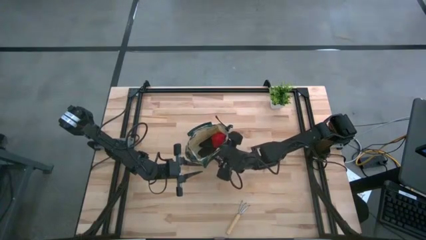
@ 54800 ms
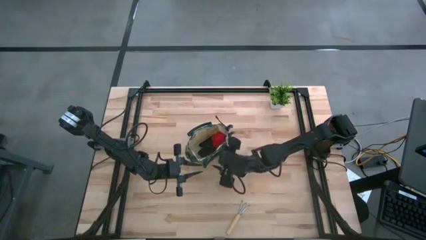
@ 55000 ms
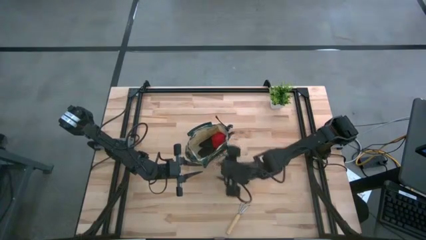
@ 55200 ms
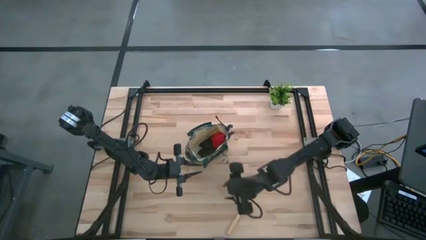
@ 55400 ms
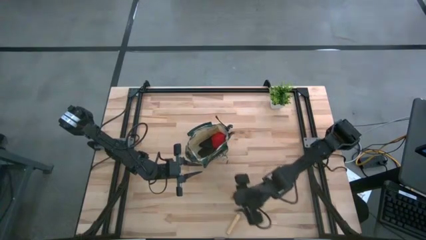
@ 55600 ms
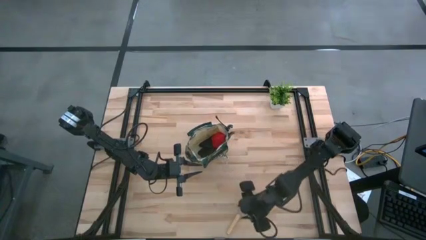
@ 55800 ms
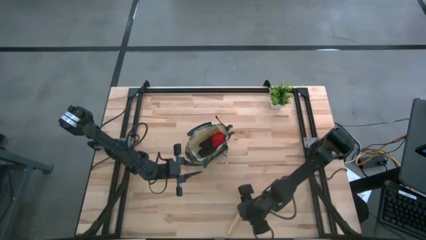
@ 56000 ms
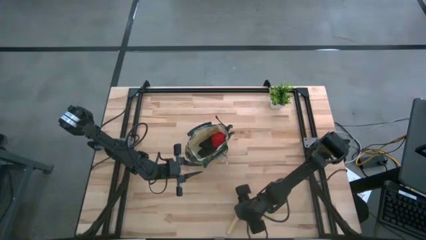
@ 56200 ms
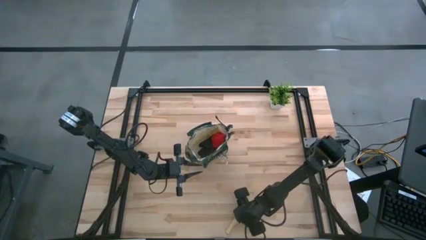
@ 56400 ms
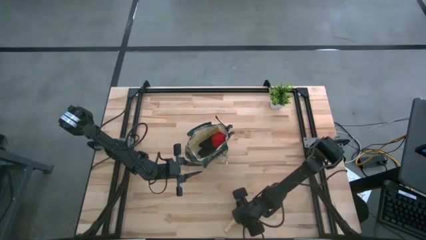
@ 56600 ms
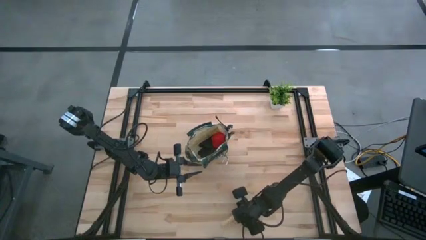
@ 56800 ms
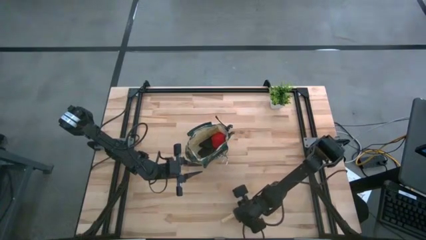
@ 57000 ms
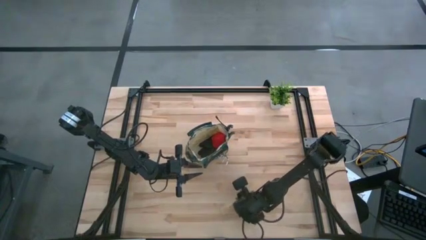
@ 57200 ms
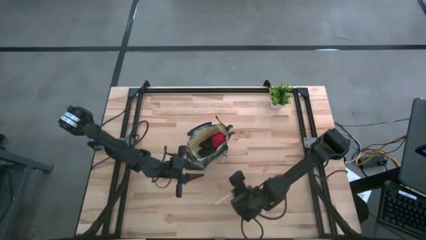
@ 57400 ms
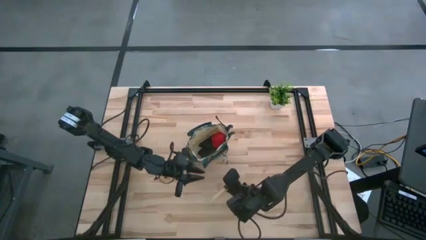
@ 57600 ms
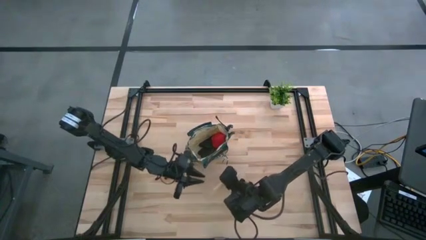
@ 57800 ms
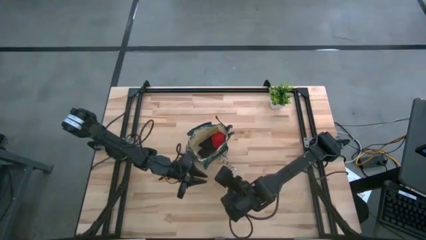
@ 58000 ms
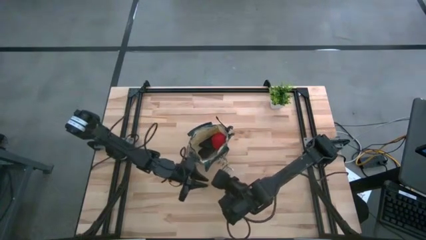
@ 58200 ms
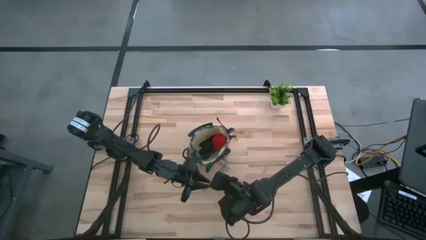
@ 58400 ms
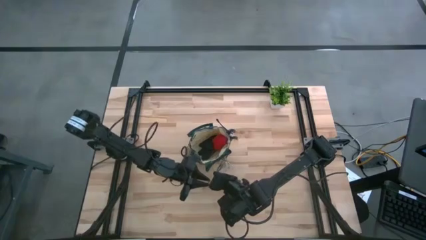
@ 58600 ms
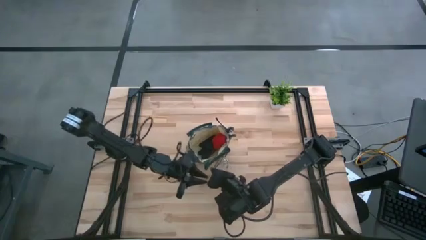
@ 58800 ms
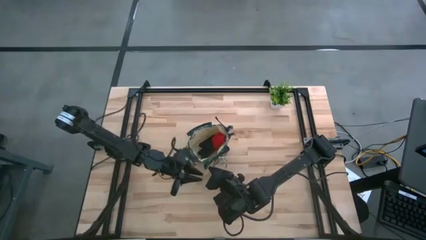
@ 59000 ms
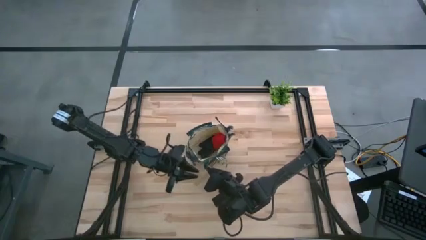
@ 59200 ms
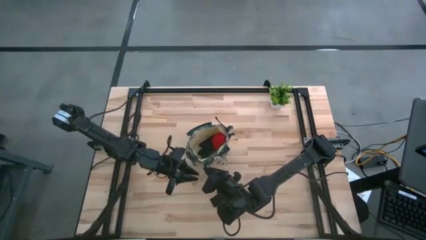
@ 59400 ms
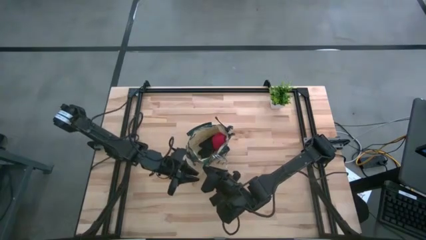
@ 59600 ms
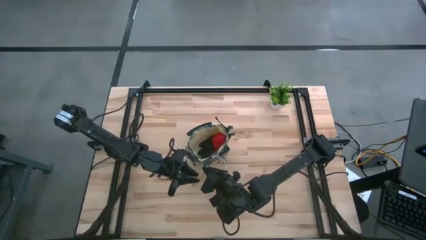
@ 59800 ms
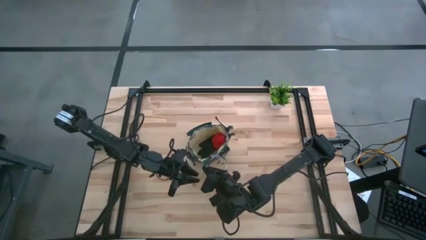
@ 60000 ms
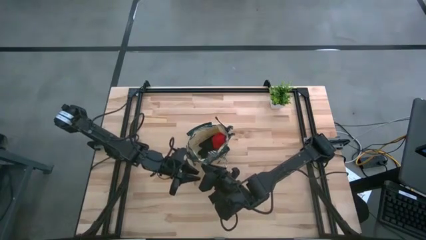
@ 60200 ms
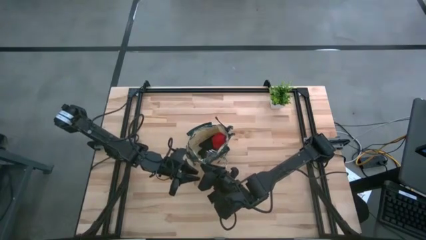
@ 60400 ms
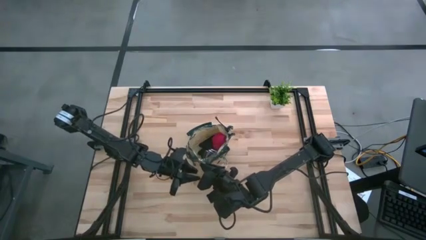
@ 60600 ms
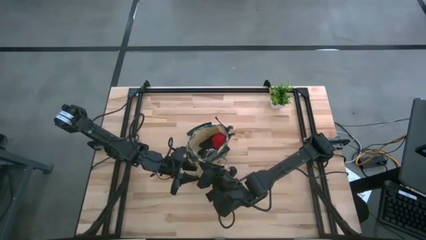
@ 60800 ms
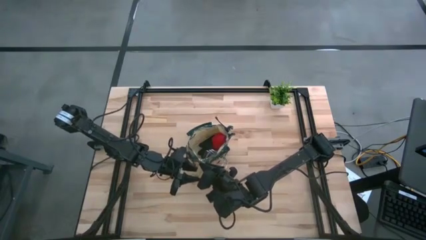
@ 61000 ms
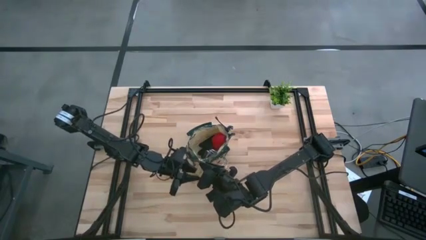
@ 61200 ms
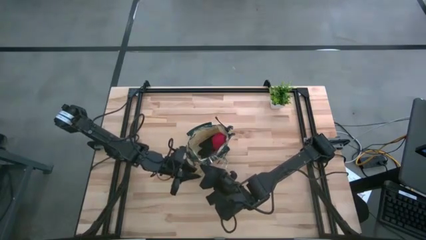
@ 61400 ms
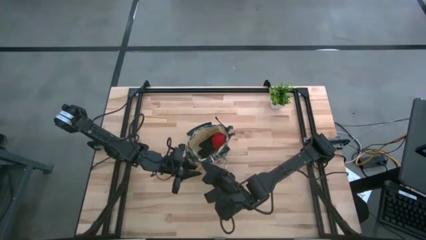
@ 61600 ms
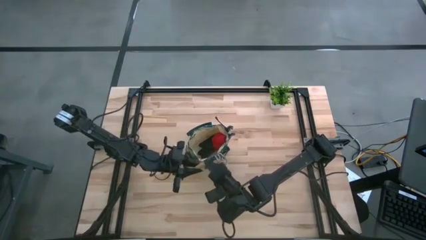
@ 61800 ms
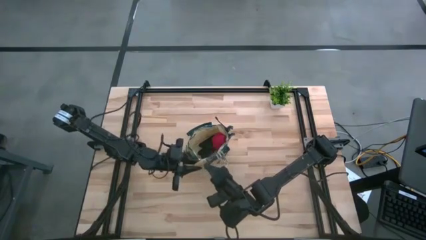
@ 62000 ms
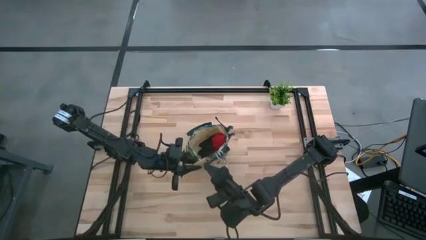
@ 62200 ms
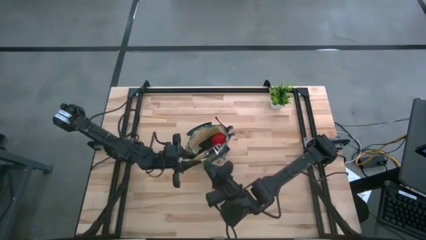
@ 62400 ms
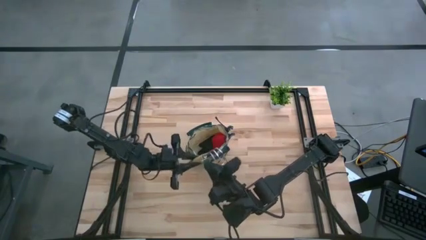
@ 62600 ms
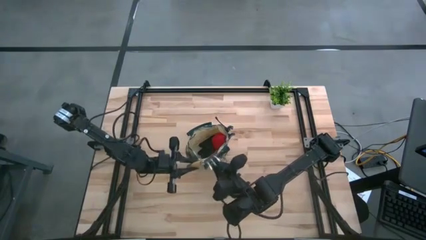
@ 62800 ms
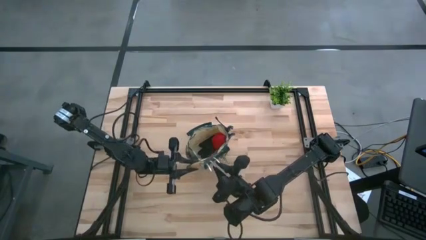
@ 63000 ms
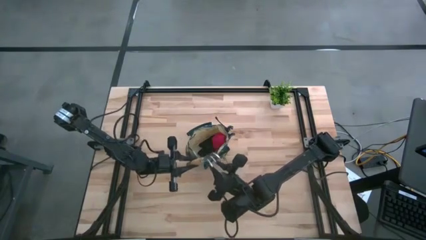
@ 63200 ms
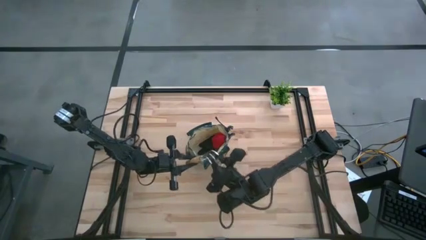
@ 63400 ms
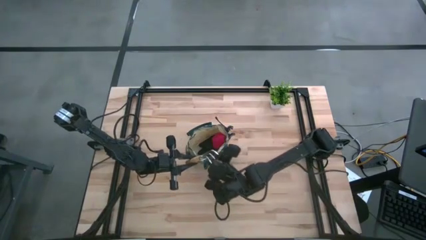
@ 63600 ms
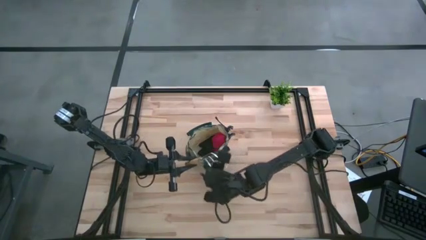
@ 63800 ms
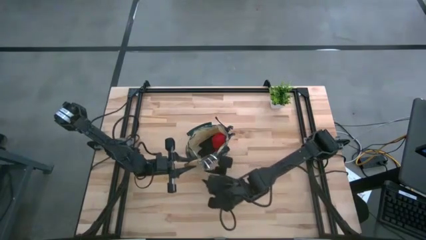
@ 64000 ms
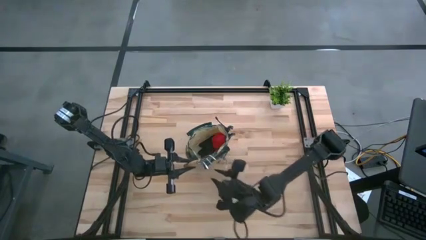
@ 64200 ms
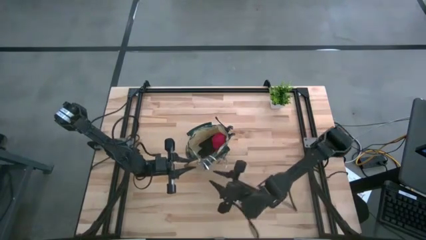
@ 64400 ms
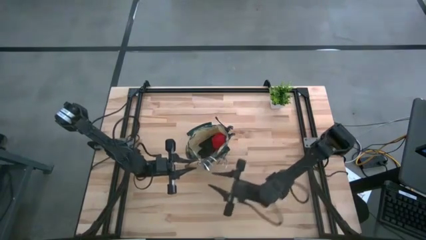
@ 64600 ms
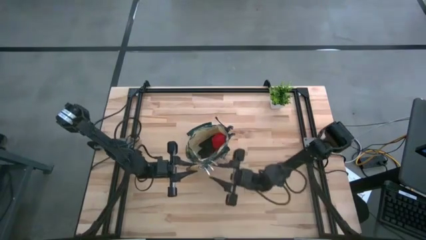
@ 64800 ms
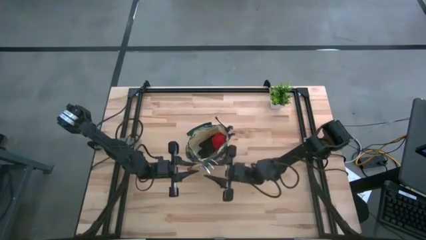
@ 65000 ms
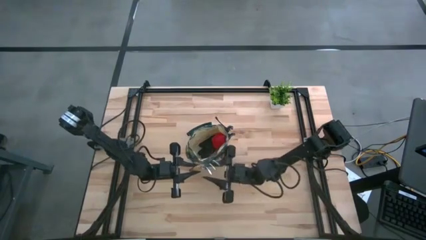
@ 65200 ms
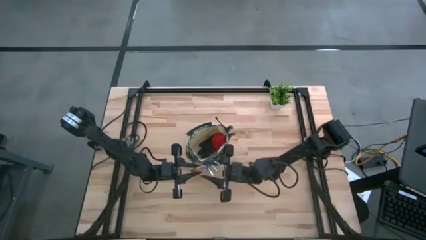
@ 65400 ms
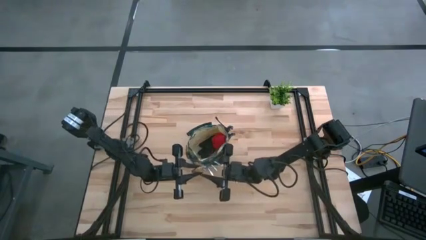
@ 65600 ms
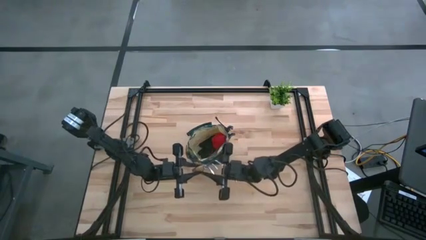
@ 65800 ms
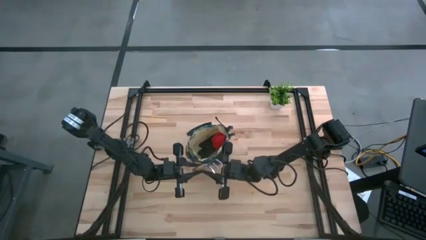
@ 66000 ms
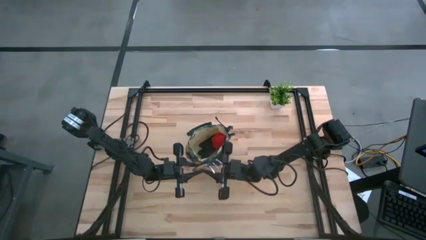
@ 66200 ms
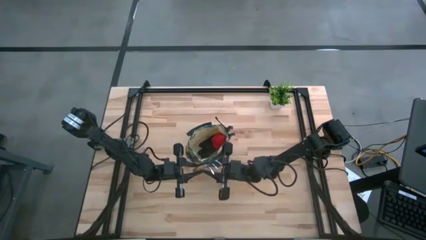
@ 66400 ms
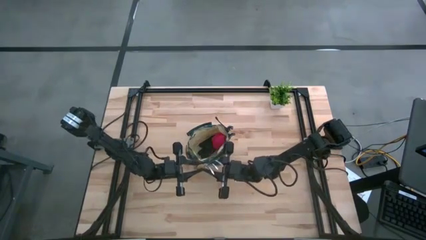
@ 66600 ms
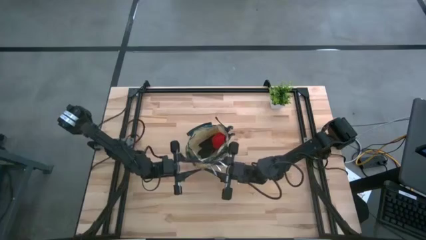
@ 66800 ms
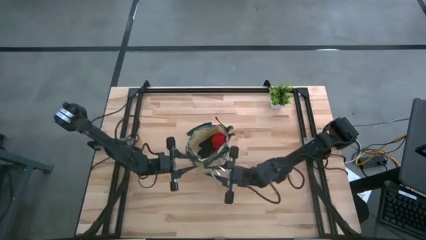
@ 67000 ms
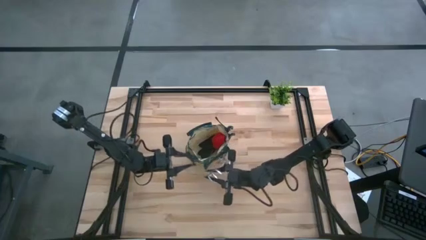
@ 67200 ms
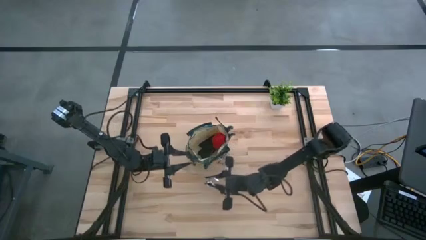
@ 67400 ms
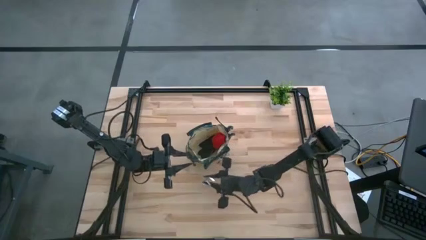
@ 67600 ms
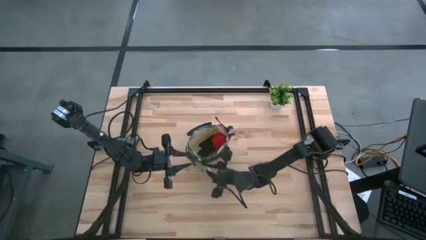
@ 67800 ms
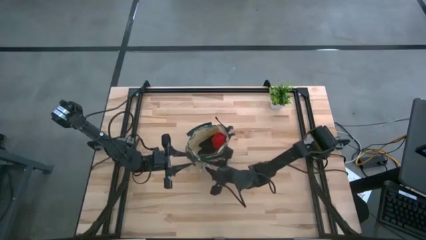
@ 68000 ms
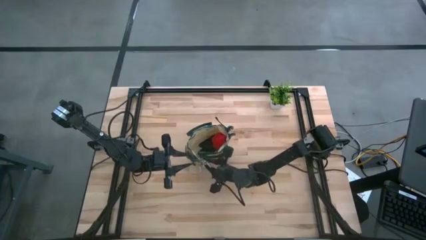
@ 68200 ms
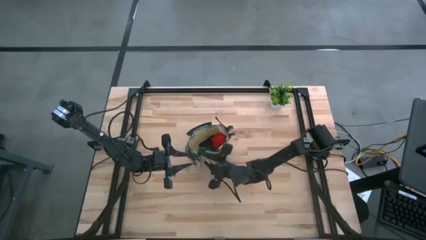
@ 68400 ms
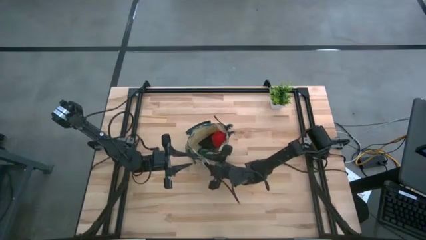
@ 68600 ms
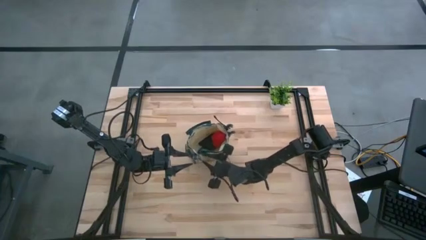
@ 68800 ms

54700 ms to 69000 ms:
Task: Pick & Place Garden tools in Gardening bag
Put the brown hand rake into the brown gardening bag
